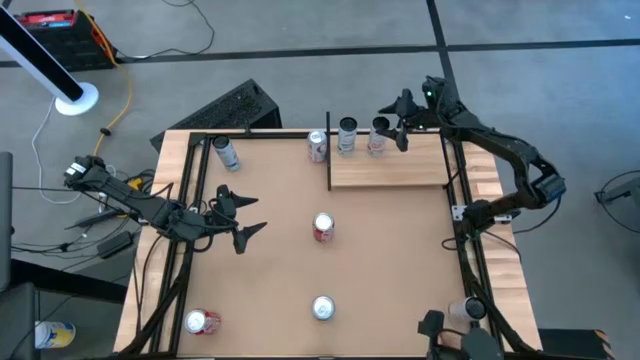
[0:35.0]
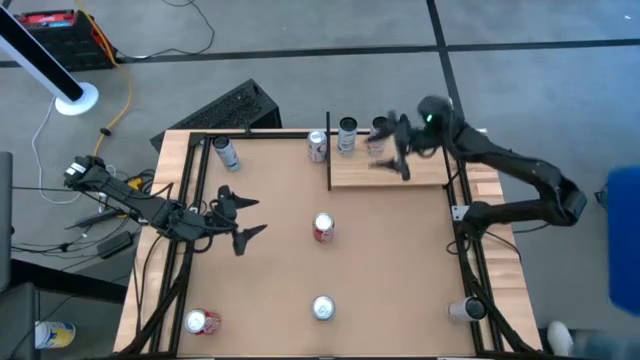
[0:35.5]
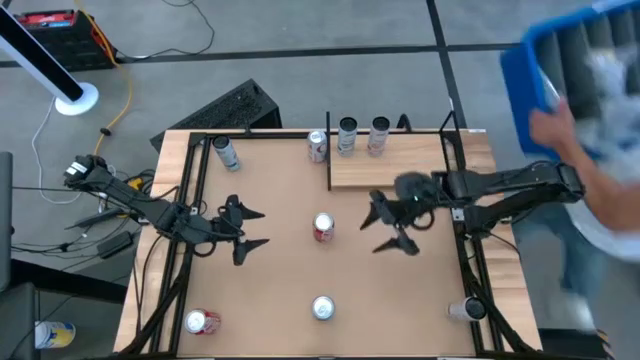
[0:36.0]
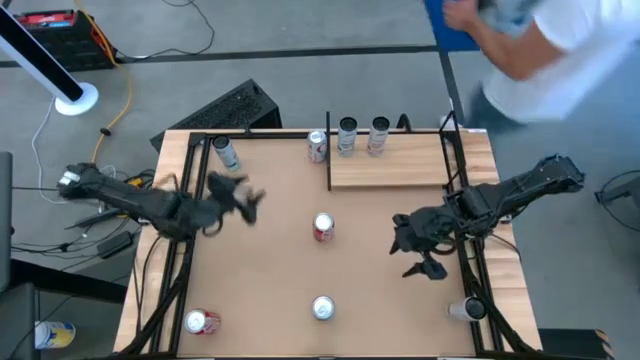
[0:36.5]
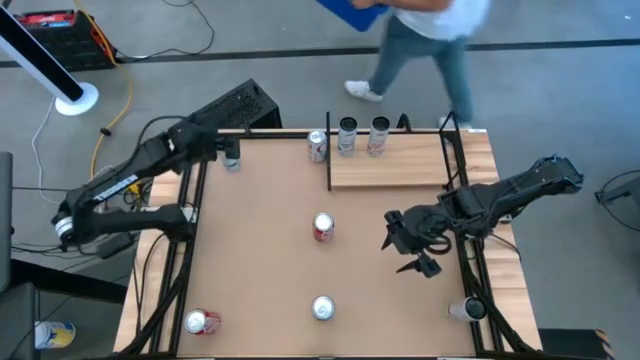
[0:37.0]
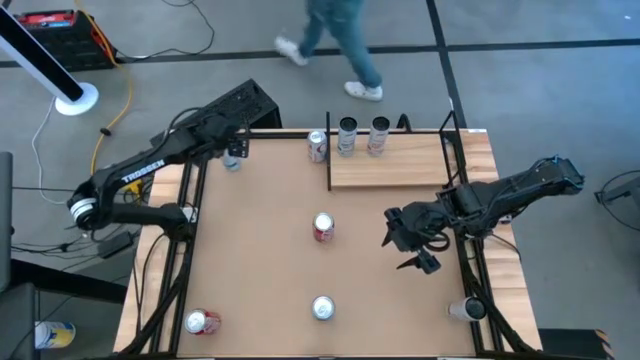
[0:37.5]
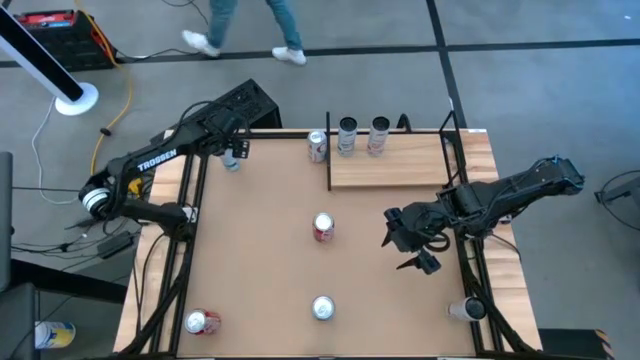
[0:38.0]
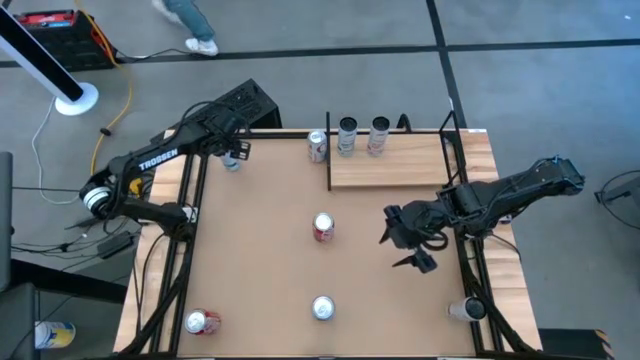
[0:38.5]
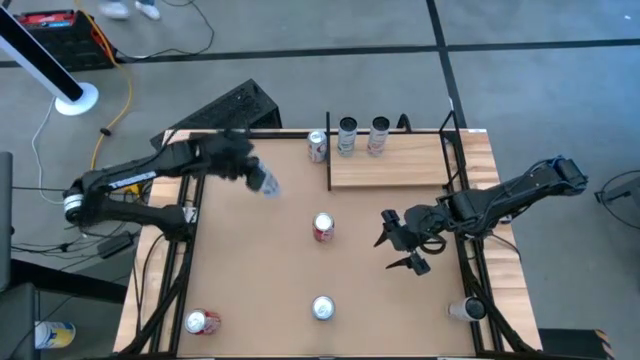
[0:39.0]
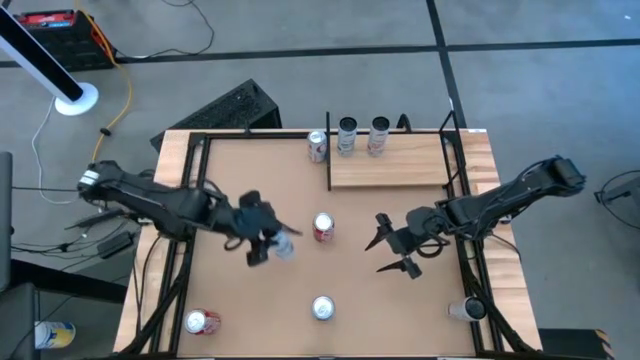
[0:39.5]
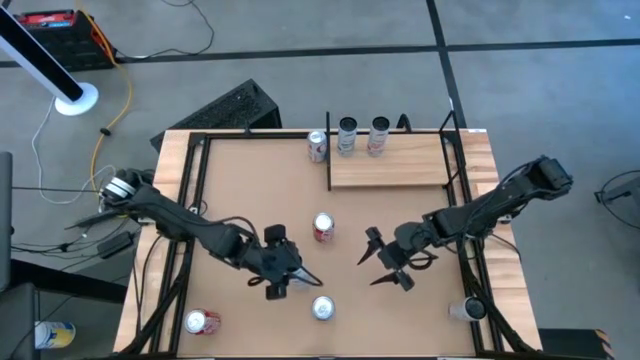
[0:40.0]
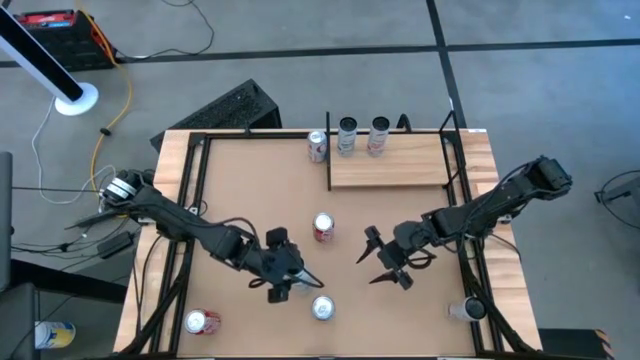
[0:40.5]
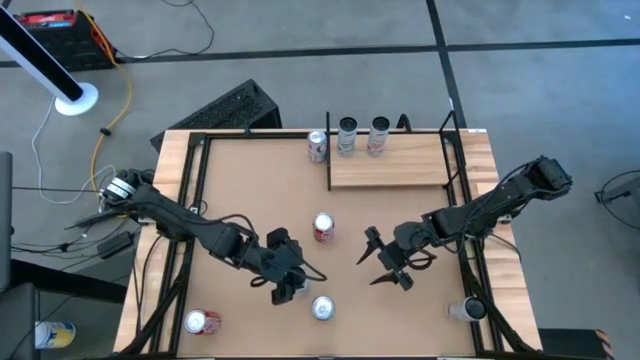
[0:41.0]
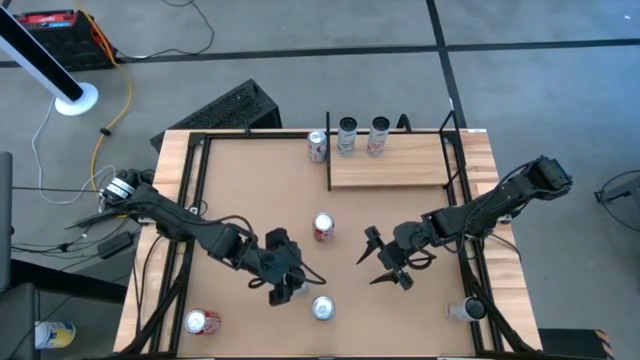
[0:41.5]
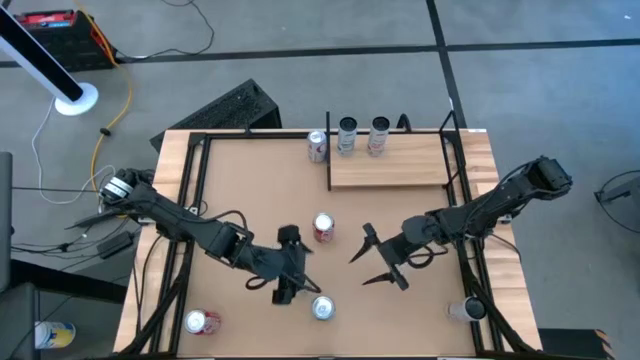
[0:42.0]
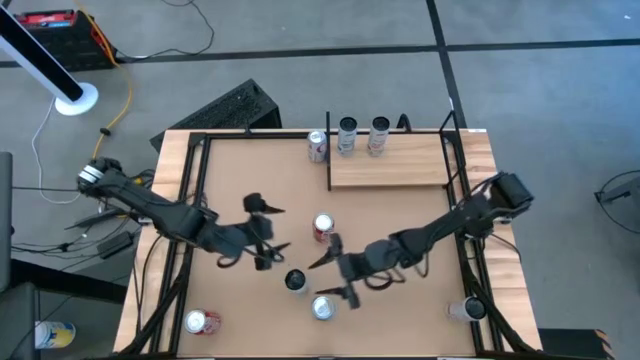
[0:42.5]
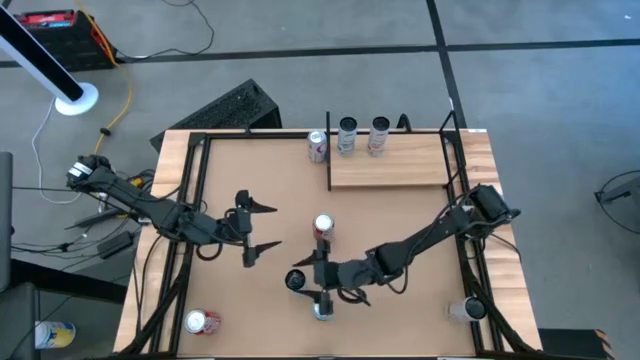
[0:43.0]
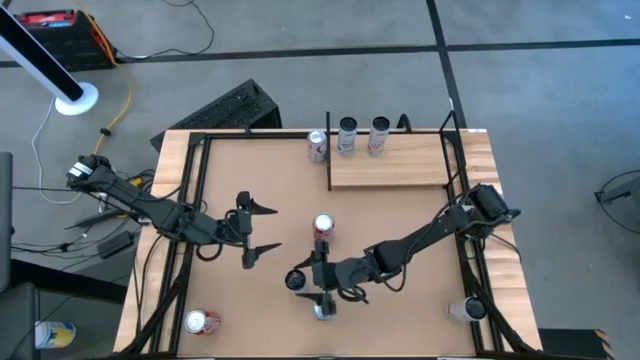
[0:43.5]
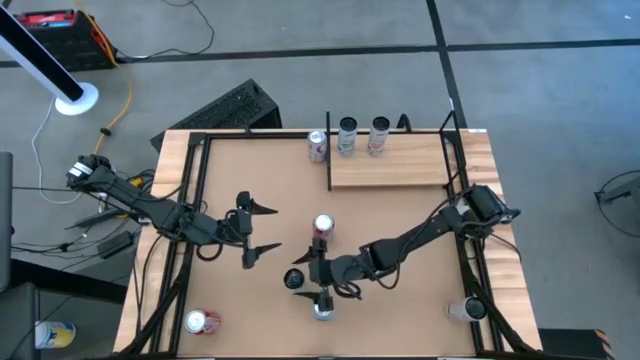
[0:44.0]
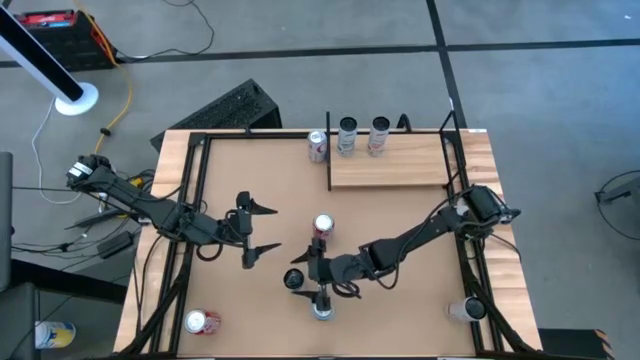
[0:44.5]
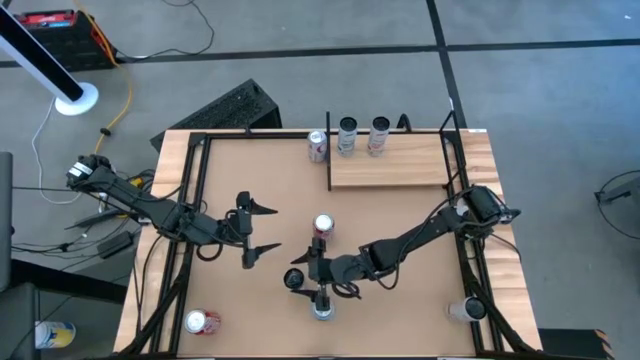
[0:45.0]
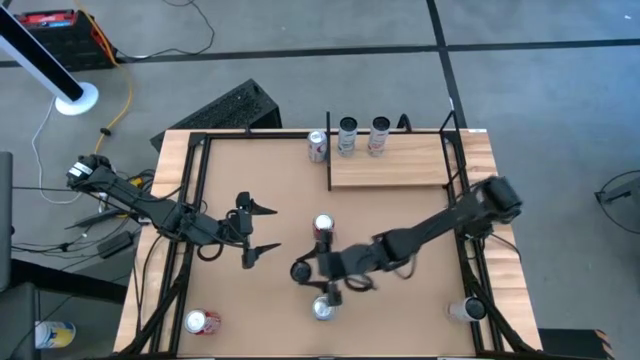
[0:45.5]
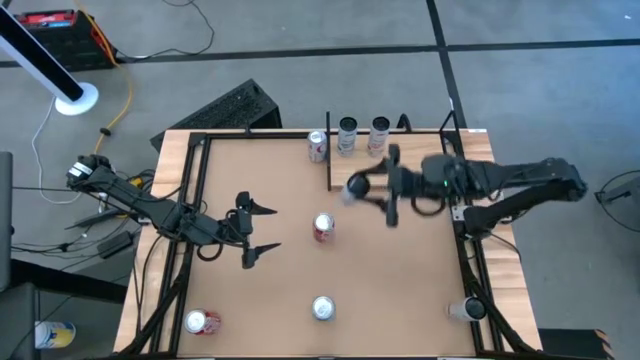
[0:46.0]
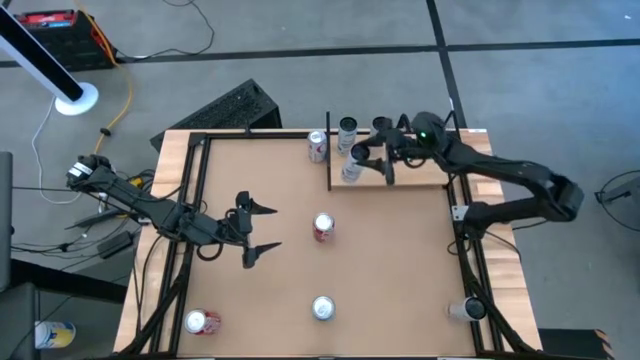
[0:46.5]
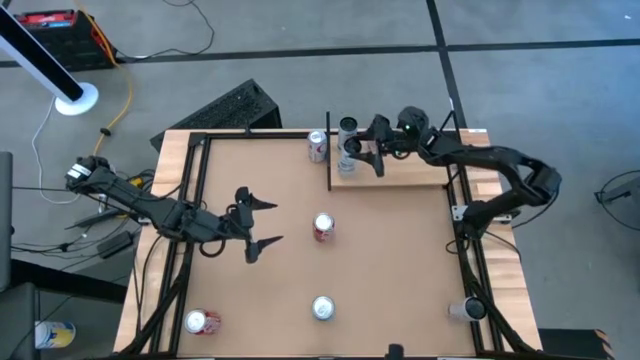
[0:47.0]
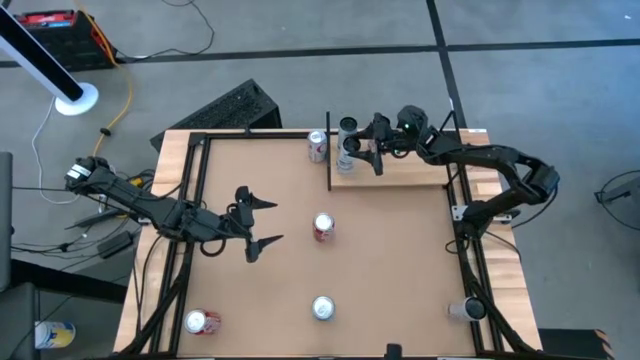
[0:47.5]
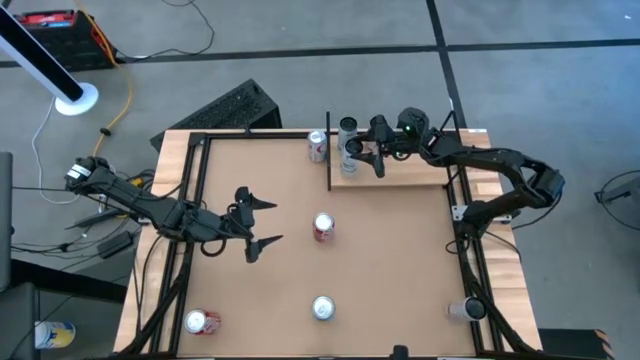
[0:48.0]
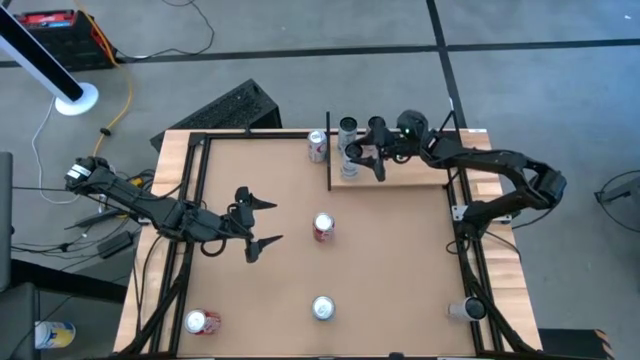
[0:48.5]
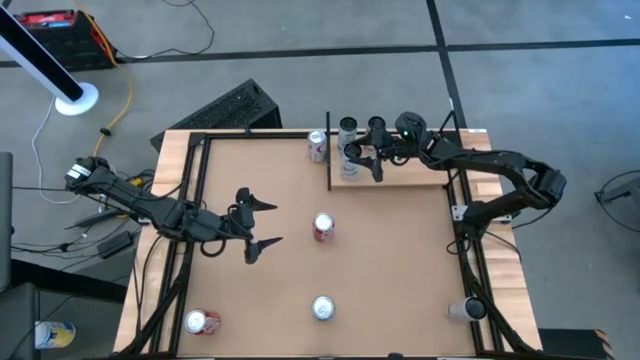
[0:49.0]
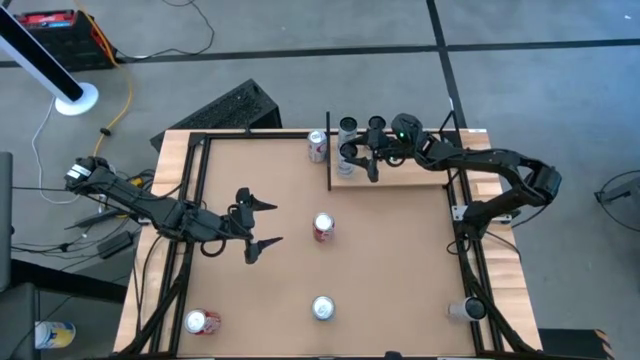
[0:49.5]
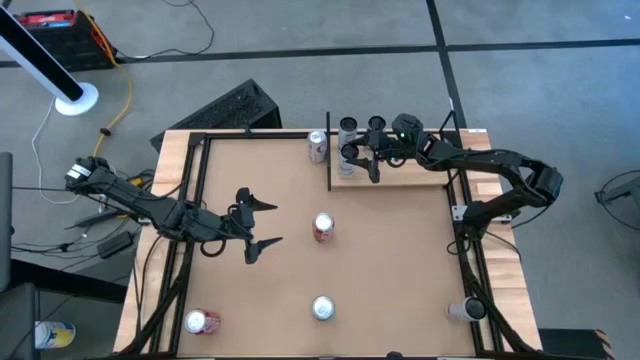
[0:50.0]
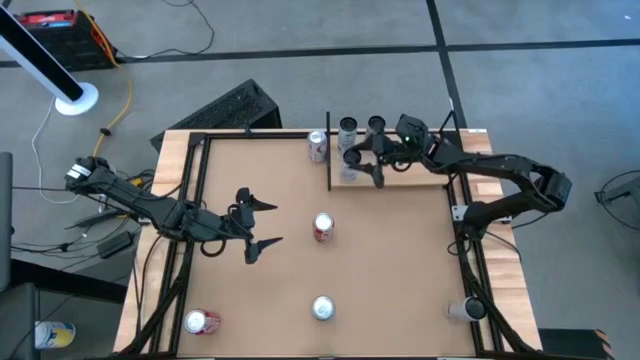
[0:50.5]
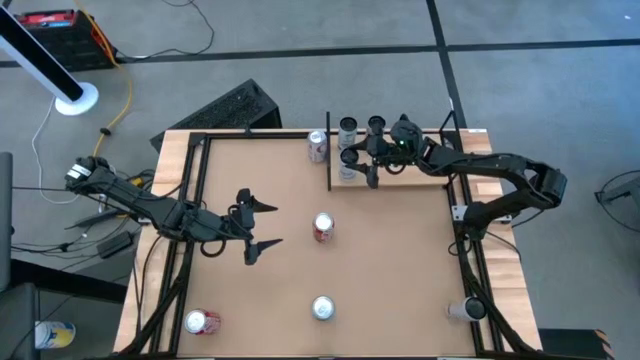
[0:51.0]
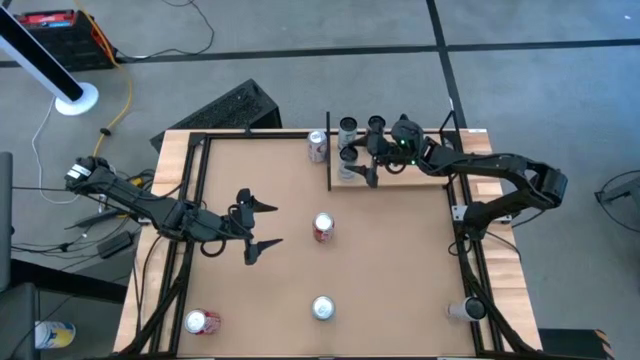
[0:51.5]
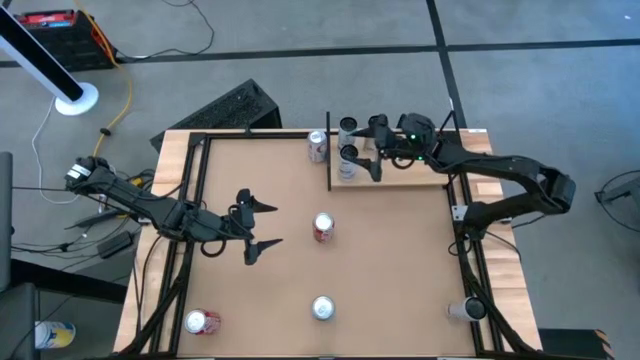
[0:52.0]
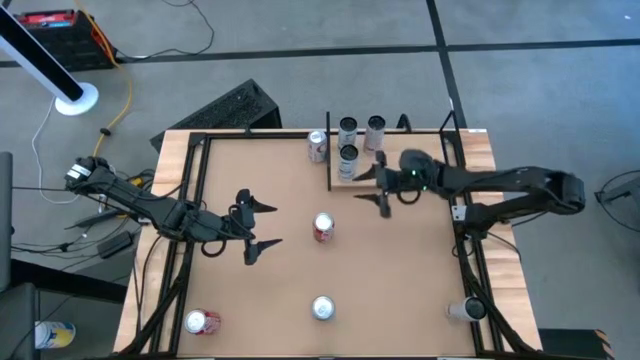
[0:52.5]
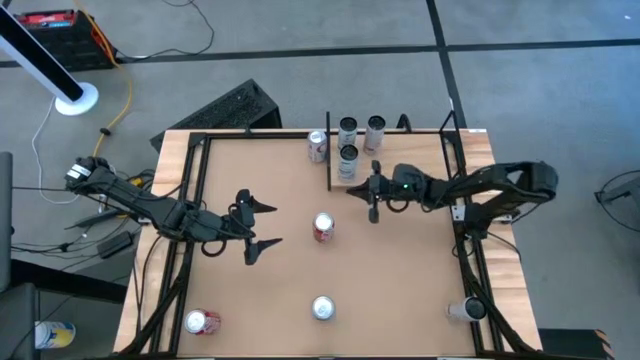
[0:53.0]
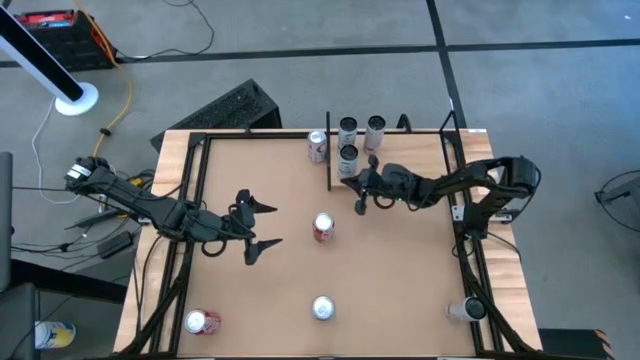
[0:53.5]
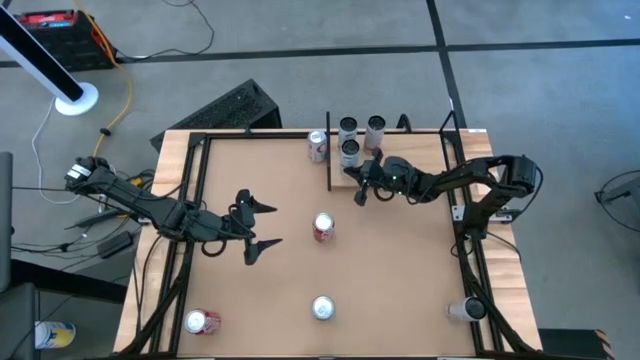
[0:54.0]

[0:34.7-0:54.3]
Task: Place canned beverage on shelf
Put the silver and blue soda can on the shelf

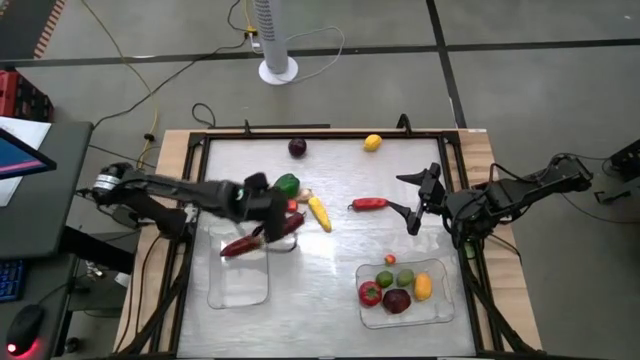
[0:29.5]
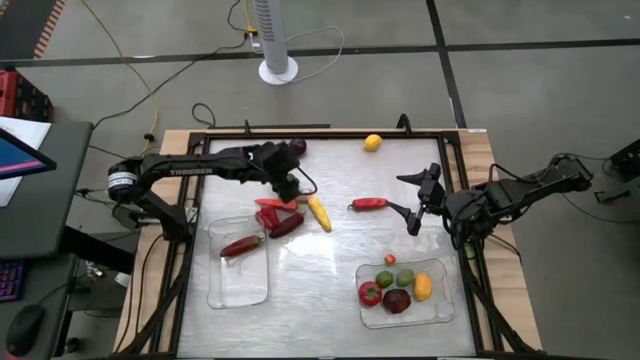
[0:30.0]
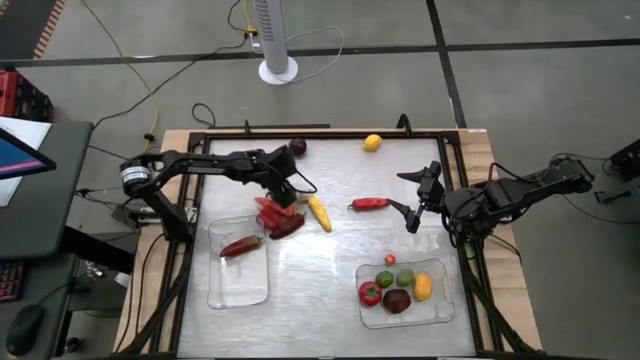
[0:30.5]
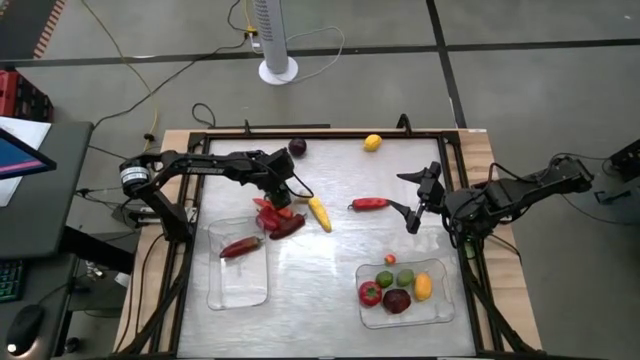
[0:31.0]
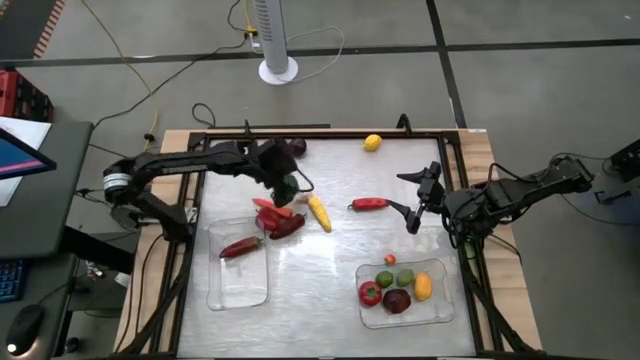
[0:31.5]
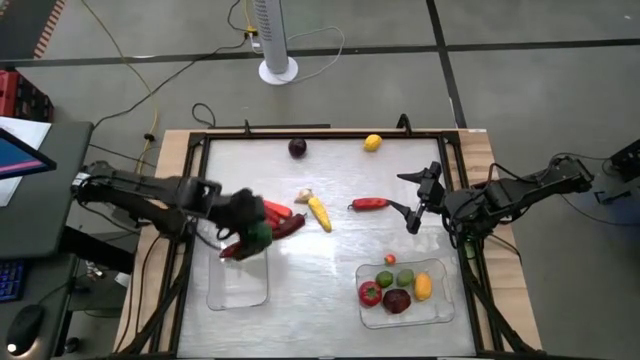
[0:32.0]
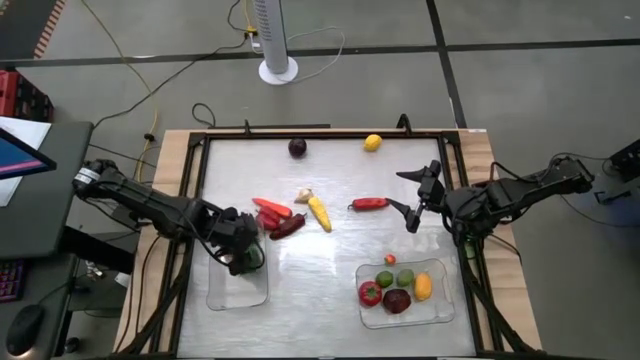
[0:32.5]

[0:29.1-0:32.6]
Task: Sort produce into baskets
Put the green bell pepper into the left transparent bin
